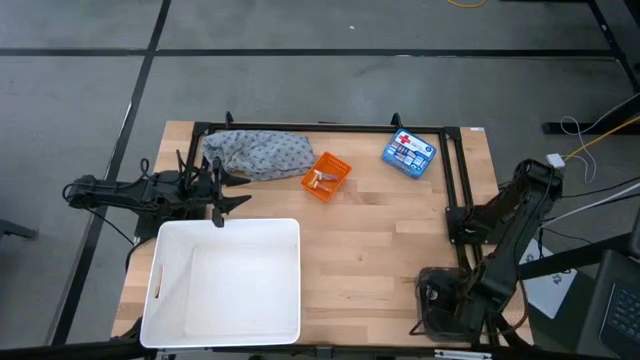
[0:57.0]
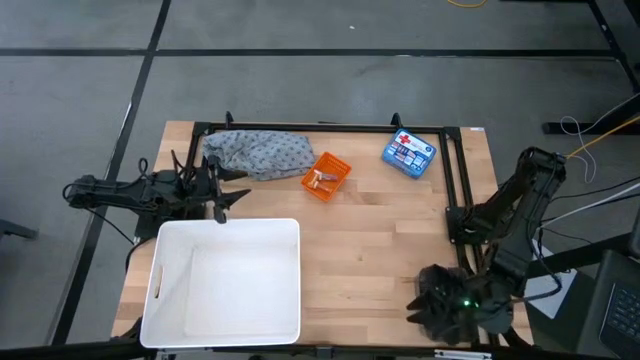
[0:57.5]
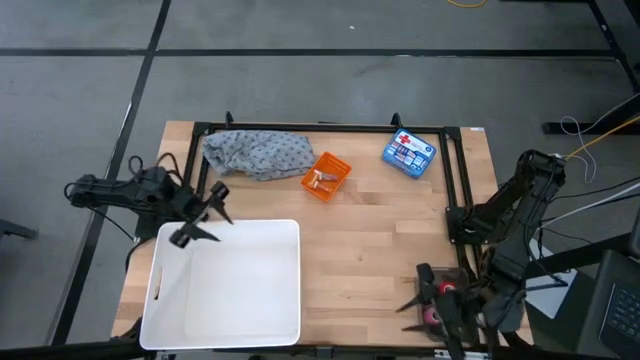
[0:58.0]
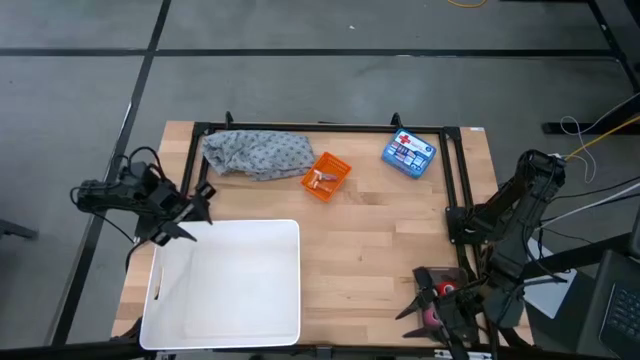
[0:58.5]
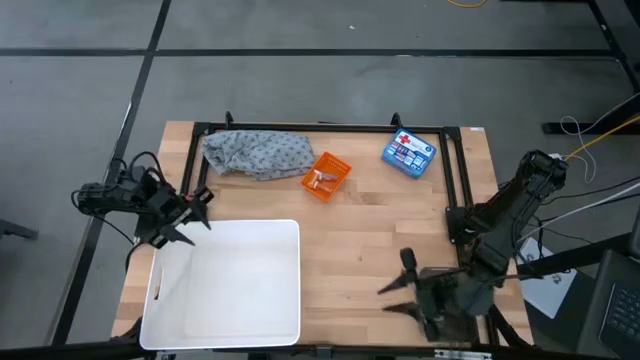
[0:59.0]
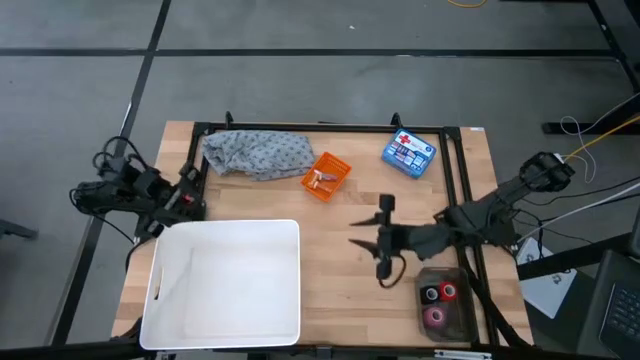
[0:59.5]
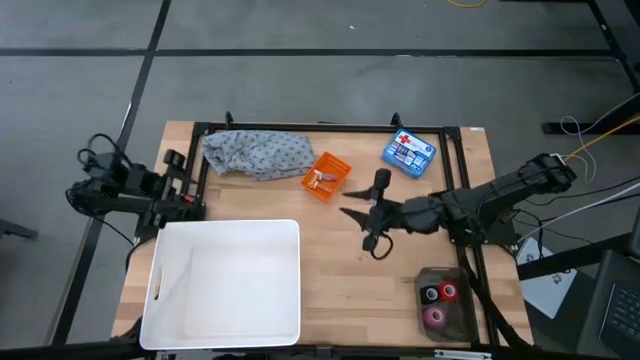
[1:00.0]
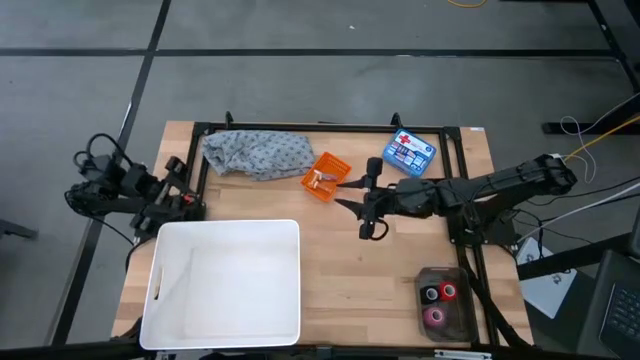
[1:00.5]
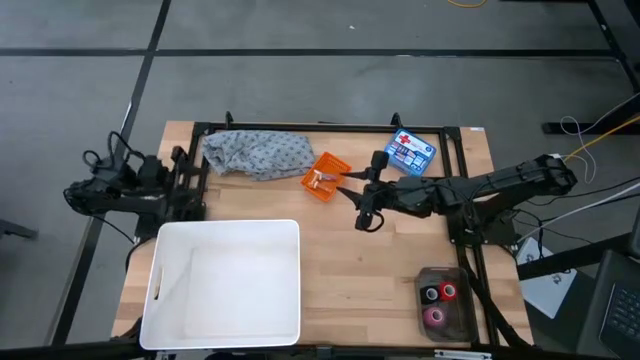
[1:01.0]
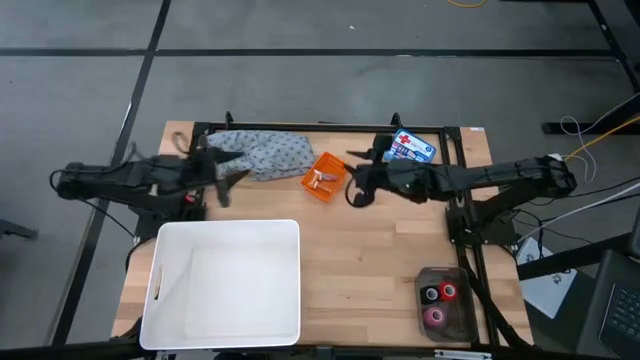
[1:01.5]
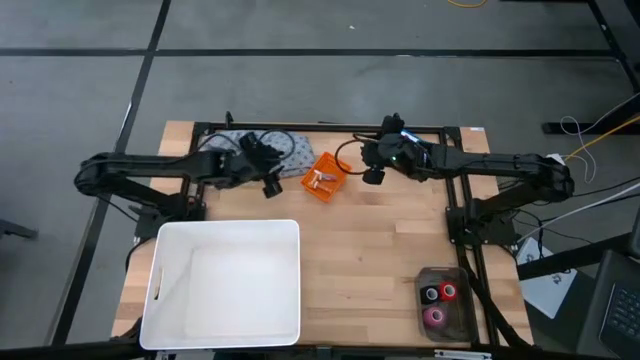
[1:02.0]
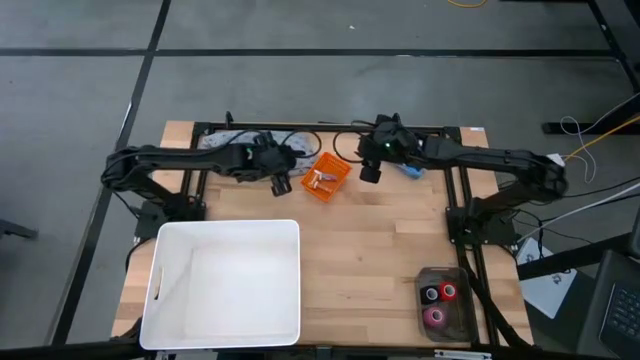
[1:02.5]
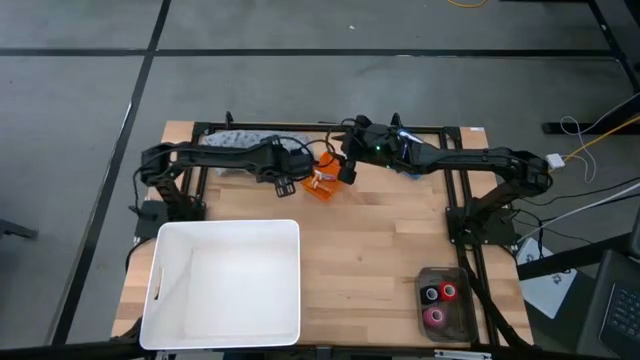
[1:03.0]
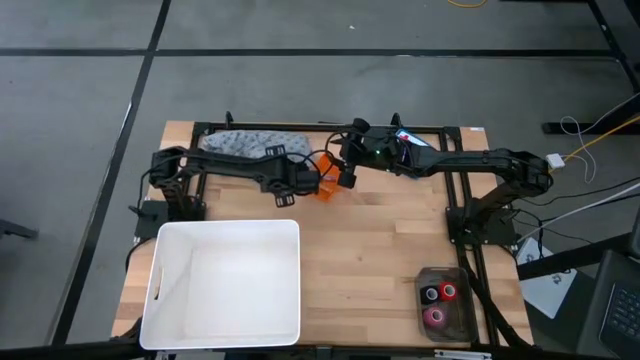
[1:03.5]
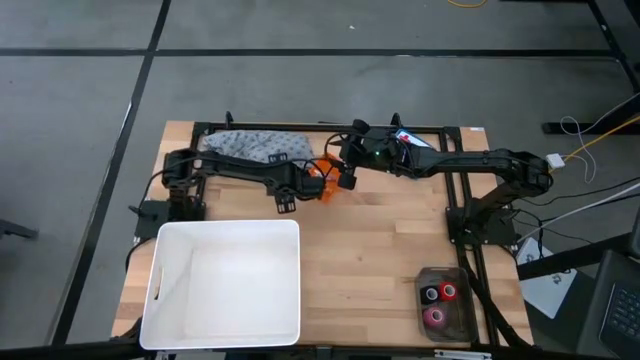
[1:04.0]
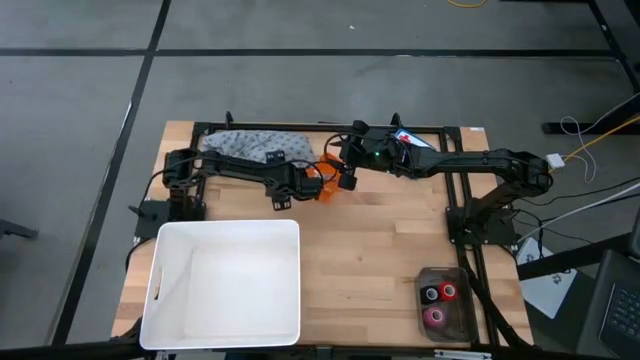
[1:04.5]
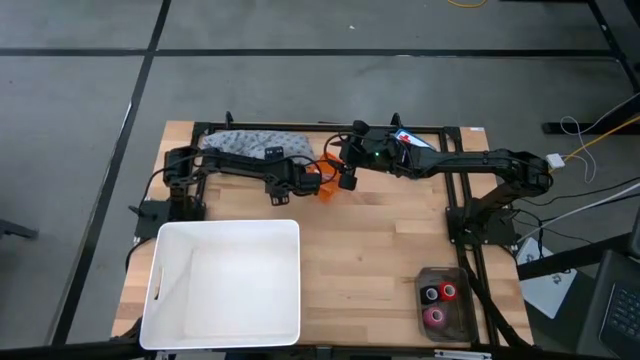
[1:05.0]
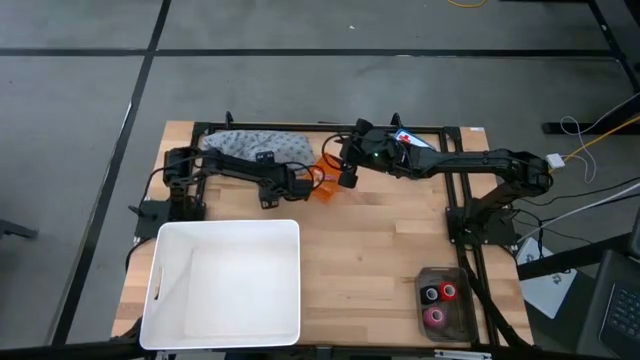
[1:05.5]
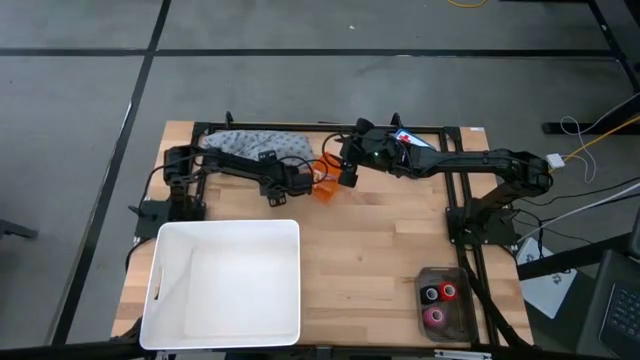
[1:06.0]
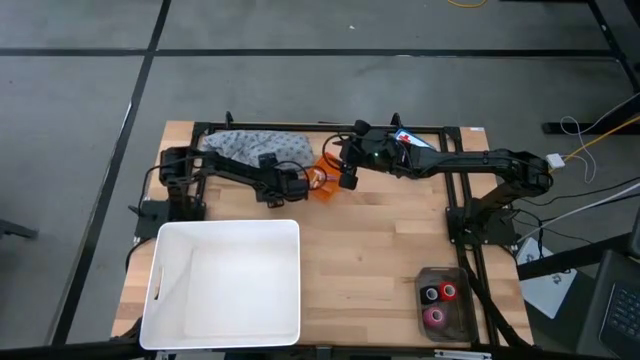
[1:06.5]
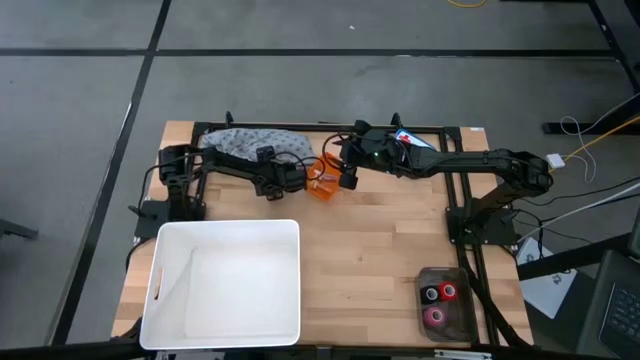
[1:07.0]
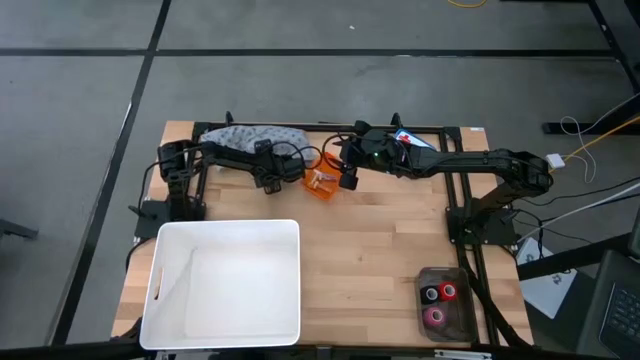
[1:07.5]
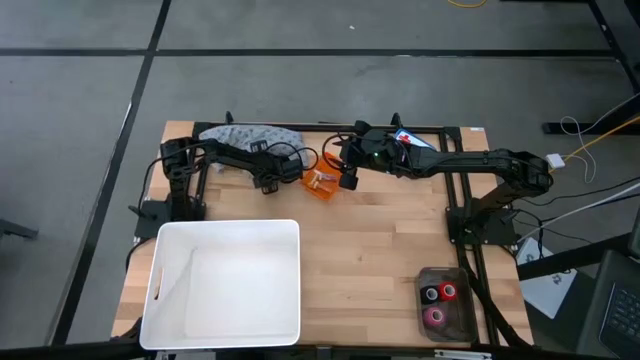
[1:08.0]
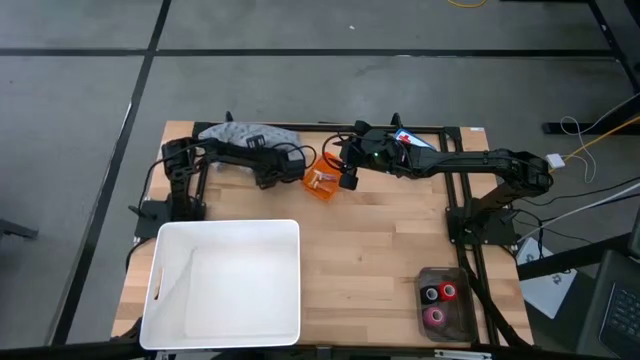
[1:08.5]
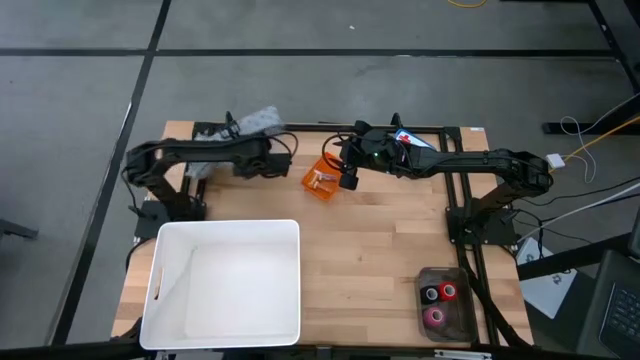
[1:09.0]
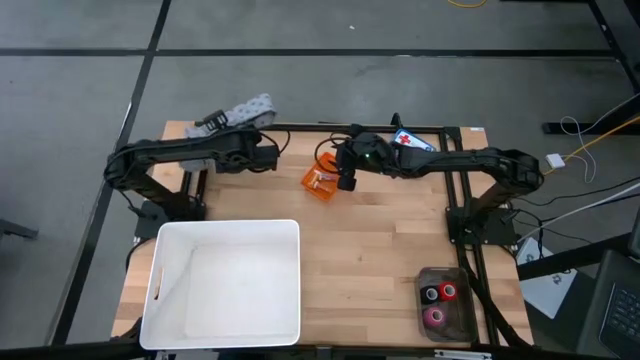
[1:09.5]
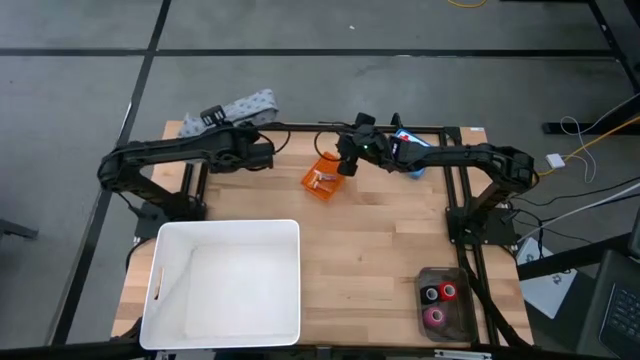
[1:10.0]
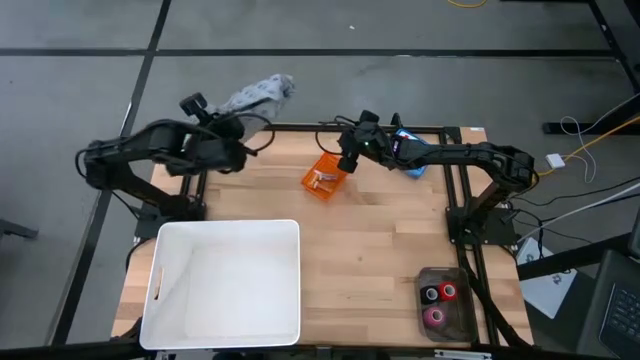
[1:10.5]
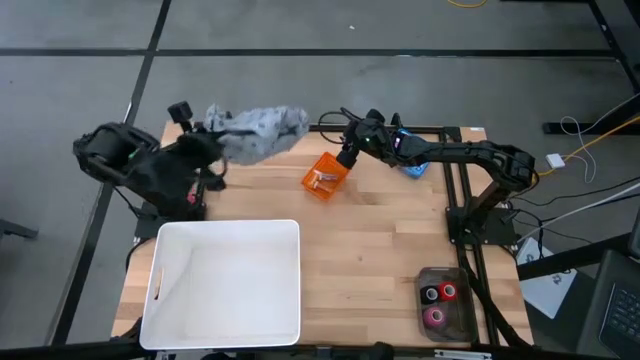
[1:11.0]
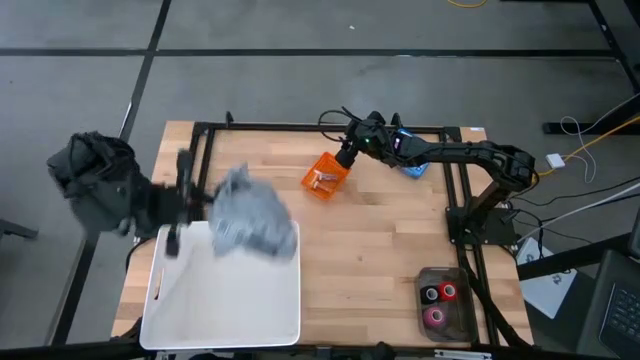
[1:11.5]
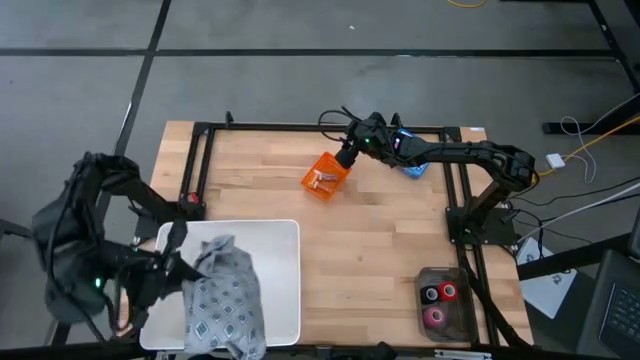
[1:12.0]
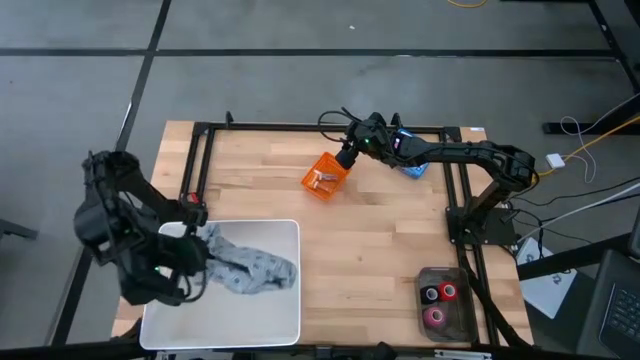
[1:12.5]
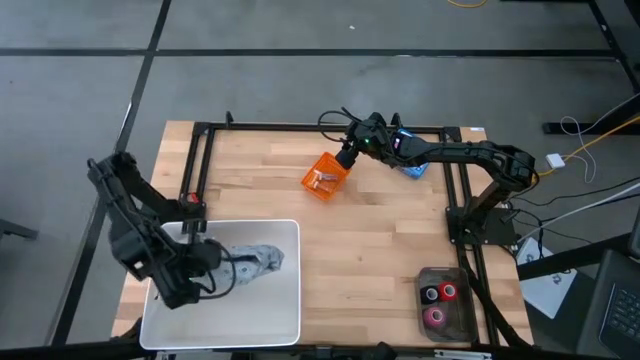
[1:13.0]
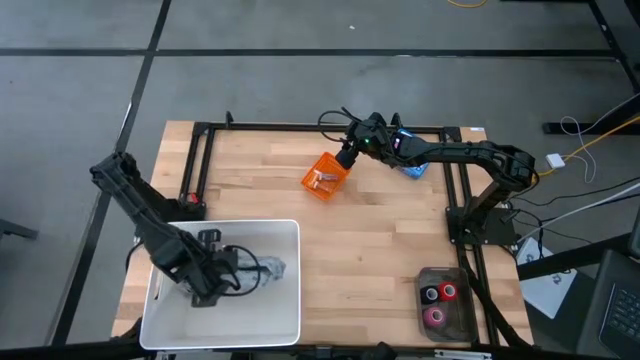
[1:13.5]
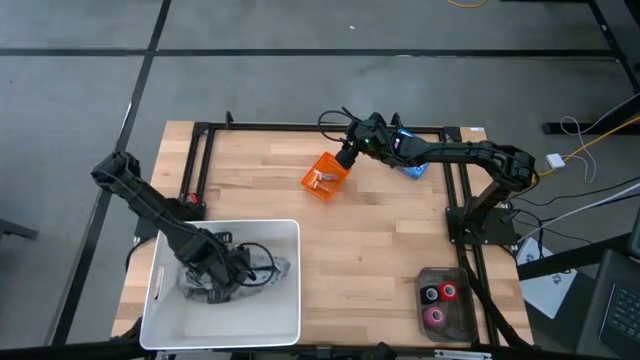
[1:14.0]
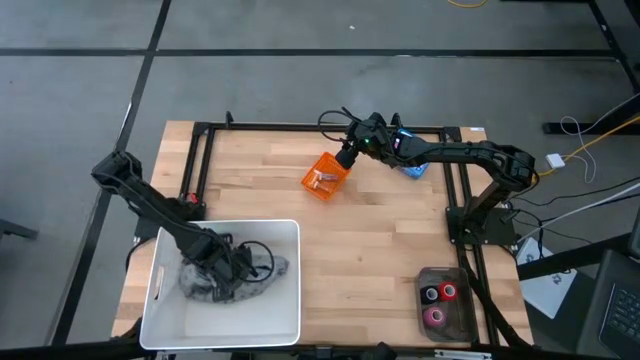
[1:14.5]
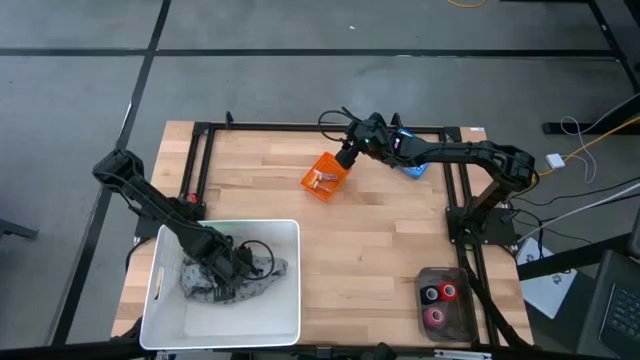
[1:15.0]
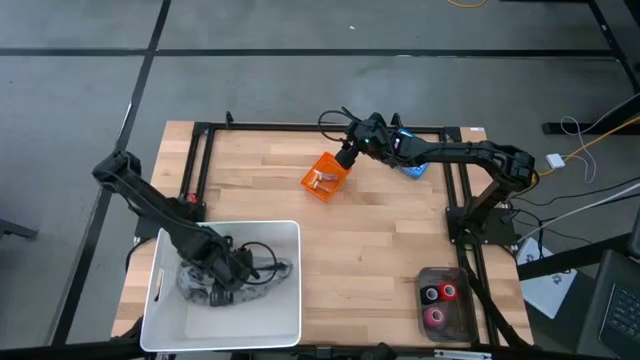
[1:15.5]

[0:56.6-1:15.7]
Task: Pick & place medical supplies in basket/bin
Put the gray patient gown into the white bin

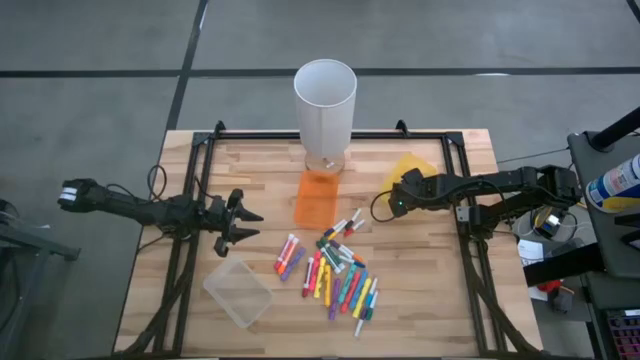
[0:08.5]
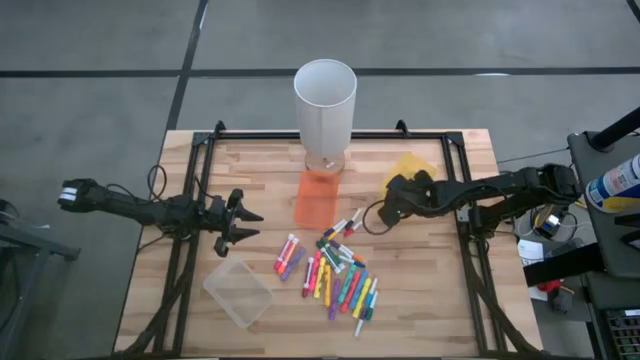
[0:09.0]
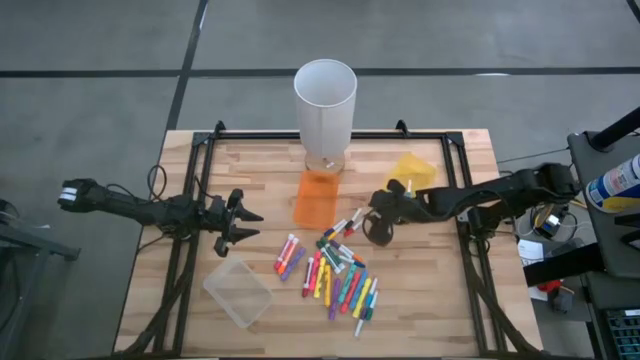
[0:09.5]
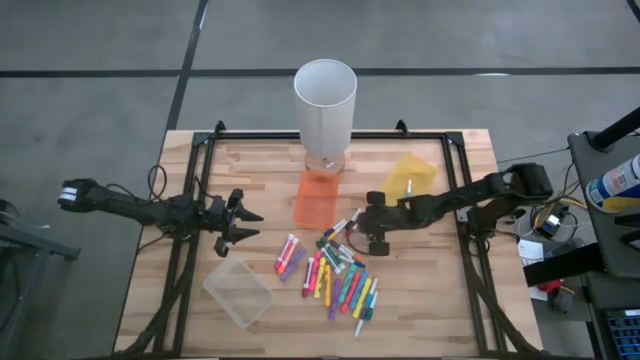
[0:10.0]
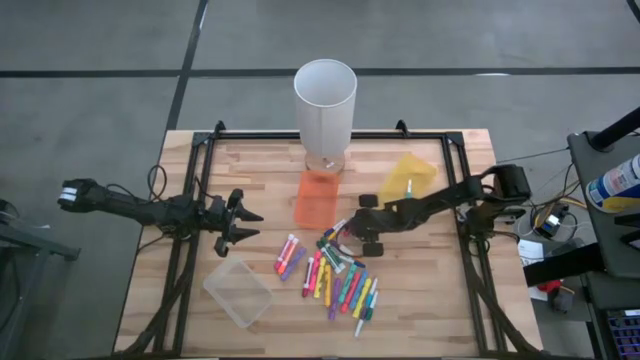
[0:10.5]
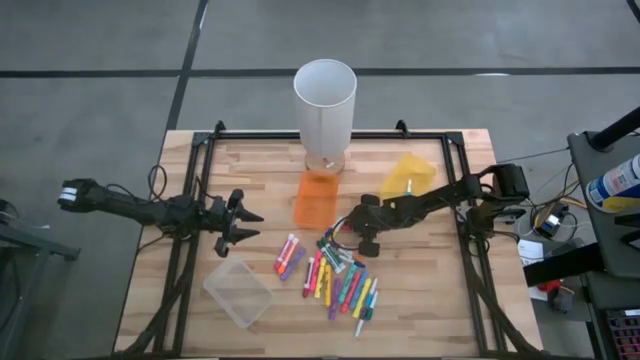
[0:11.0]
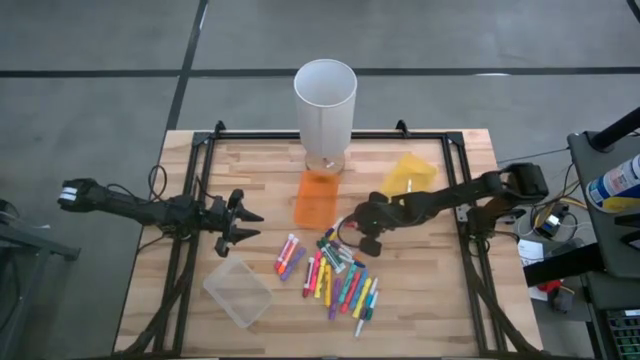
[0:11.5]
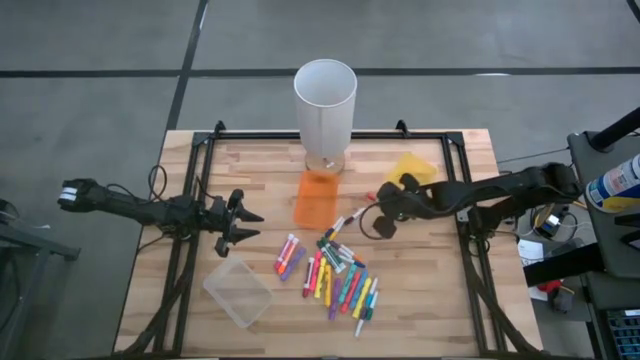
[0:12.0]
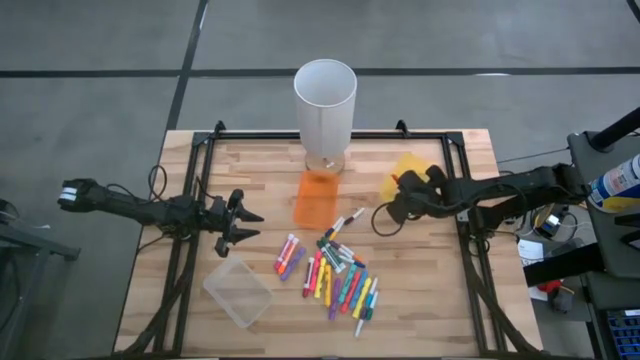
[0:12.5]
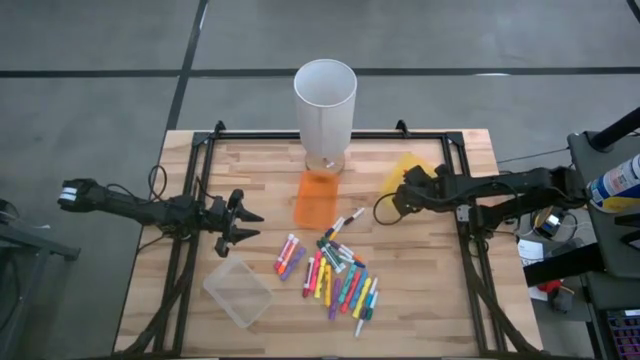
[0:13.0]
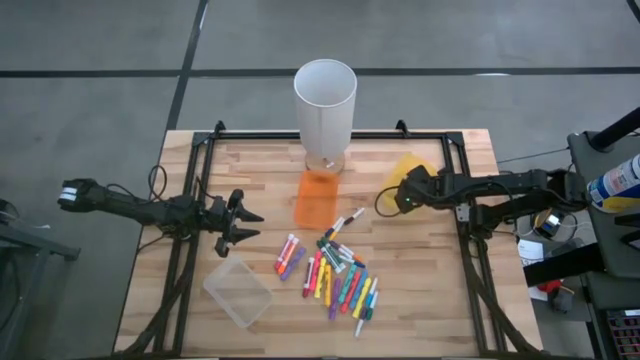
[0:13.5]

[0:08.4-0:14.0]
Task: Pick & Place Markers
Put the small red marker pen into the yellow bin
